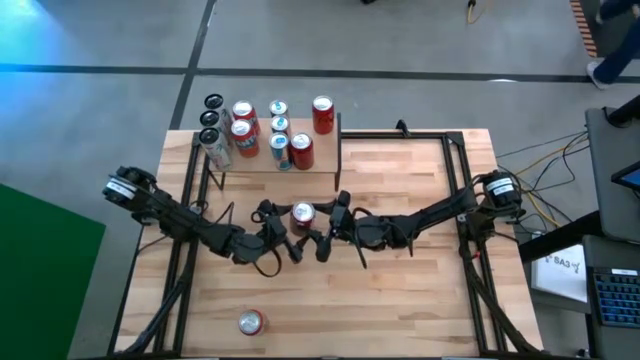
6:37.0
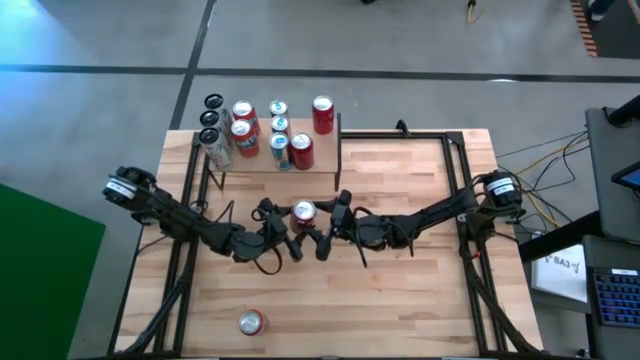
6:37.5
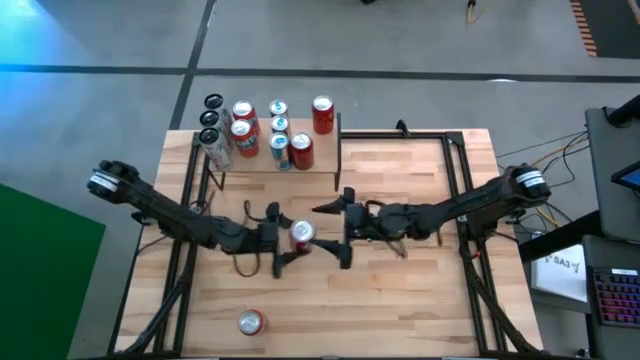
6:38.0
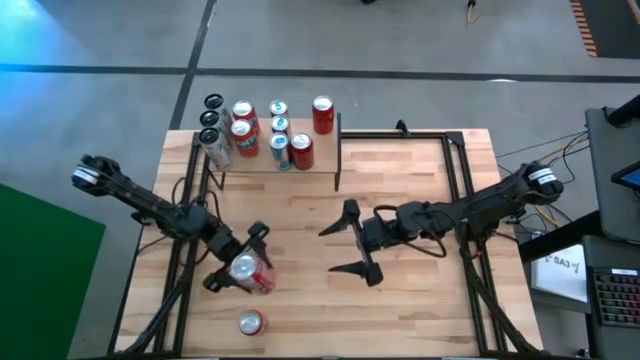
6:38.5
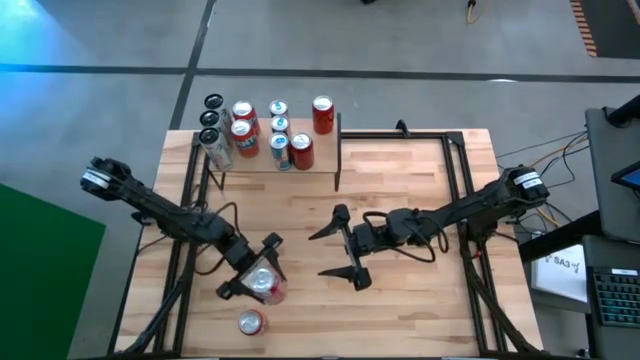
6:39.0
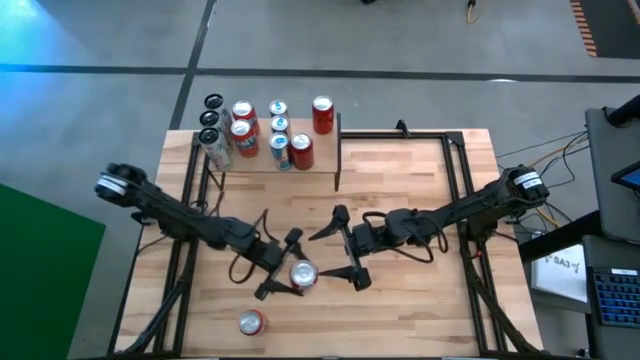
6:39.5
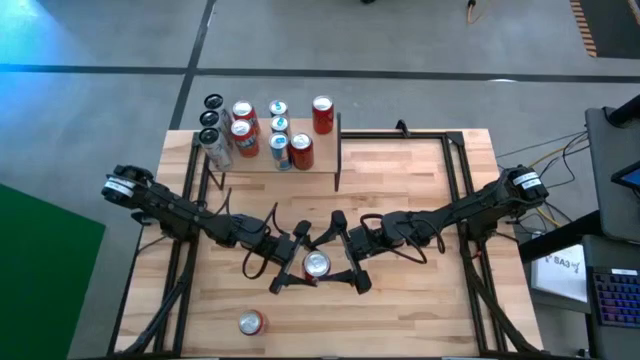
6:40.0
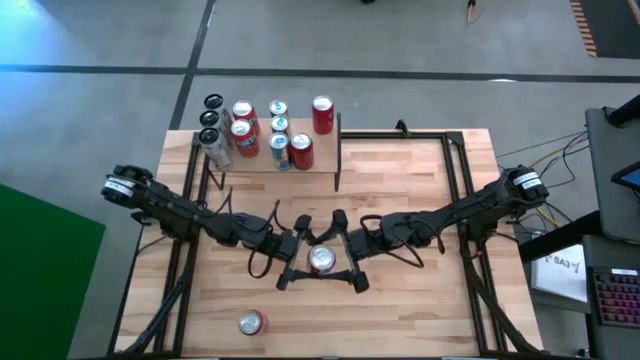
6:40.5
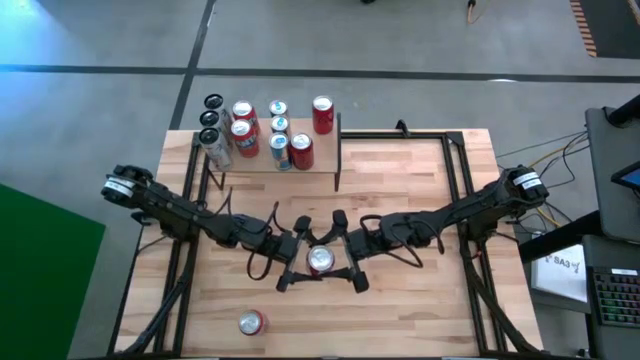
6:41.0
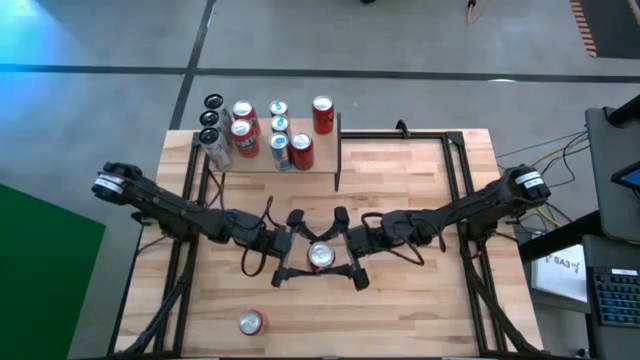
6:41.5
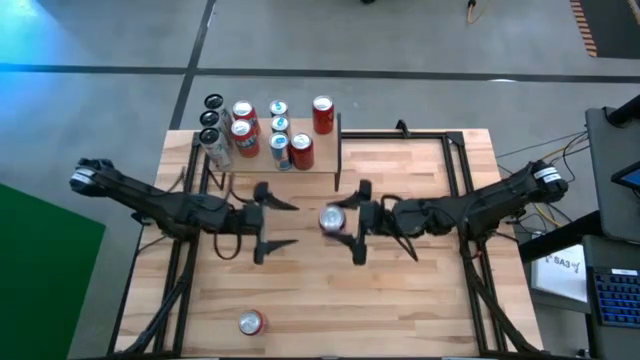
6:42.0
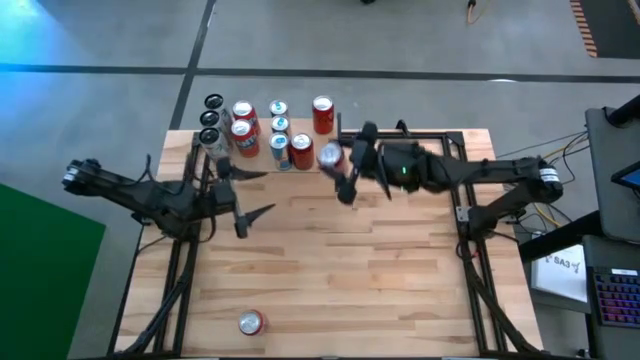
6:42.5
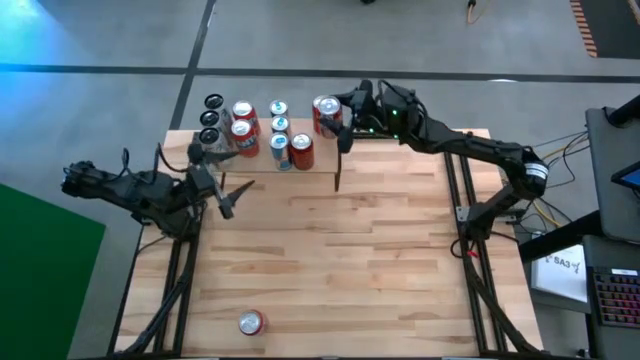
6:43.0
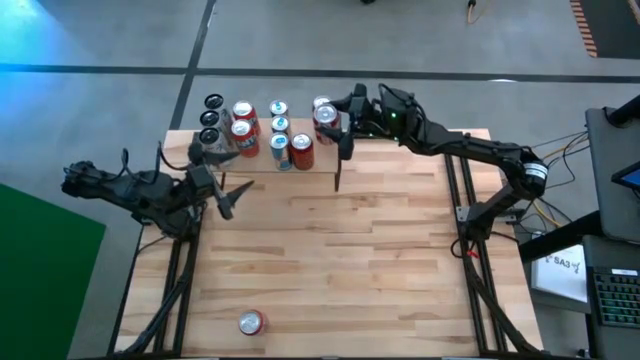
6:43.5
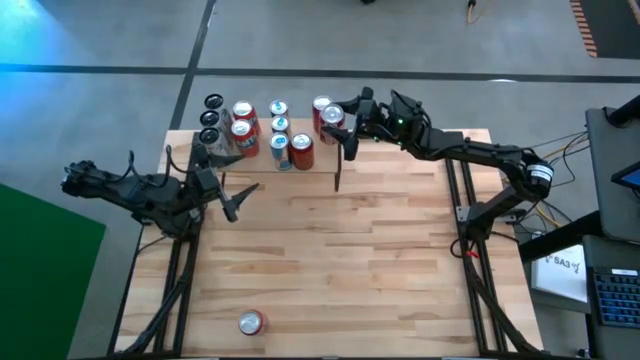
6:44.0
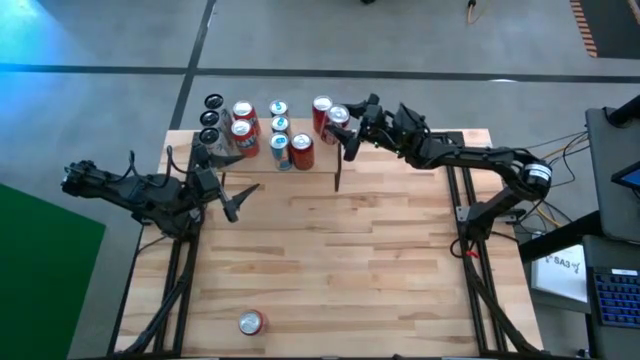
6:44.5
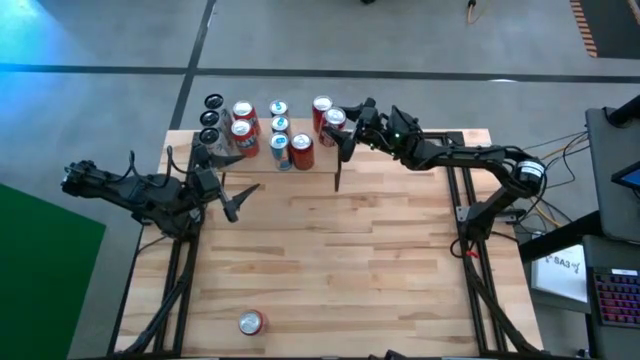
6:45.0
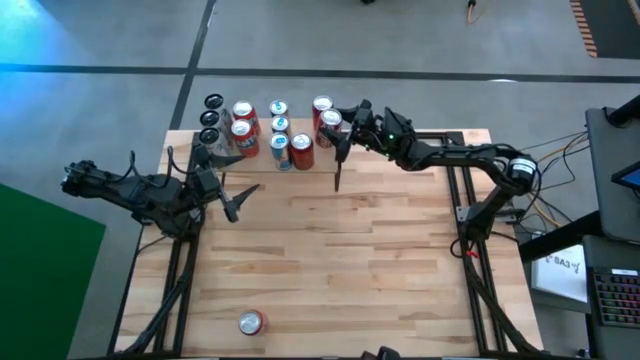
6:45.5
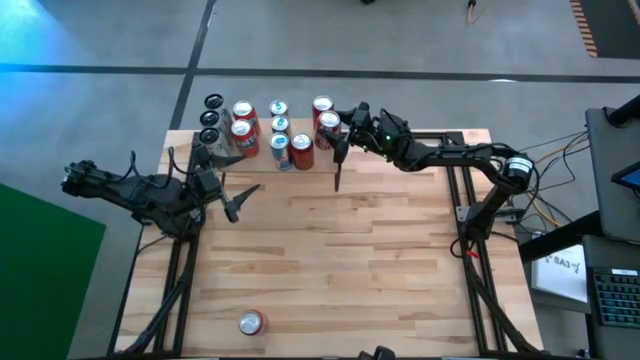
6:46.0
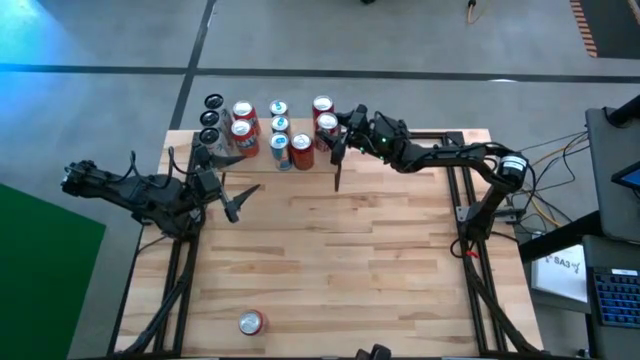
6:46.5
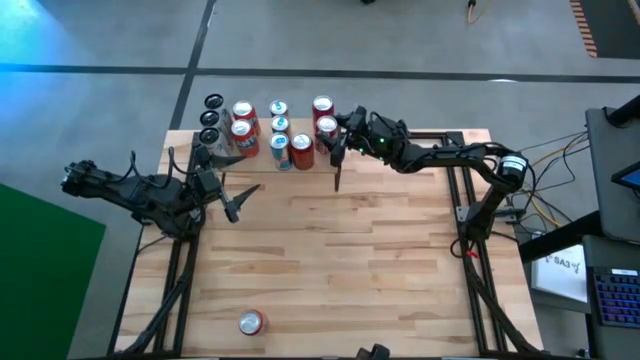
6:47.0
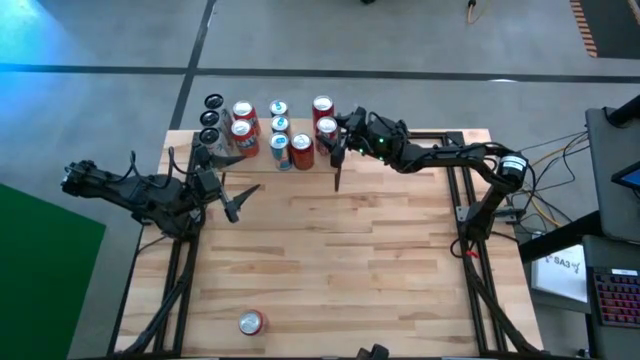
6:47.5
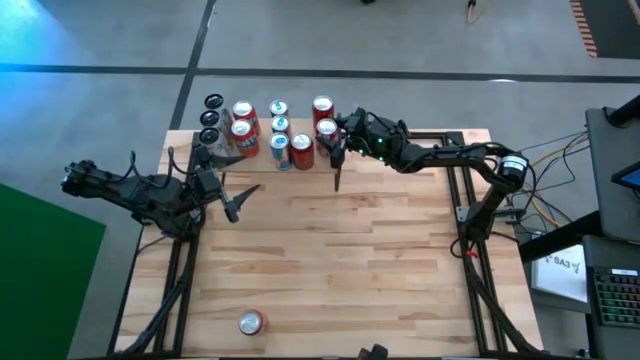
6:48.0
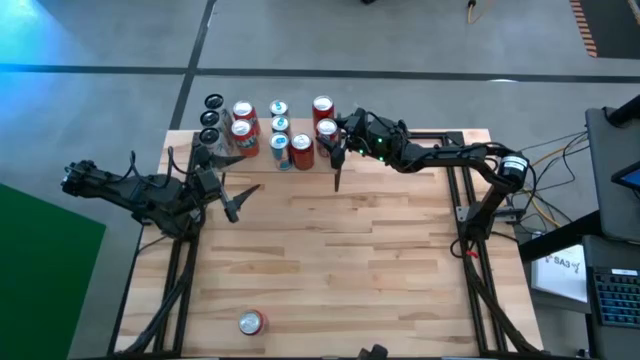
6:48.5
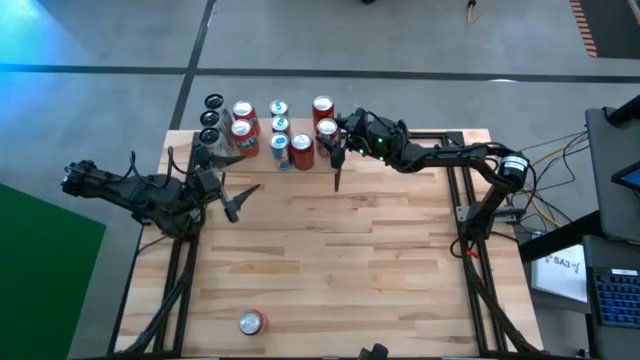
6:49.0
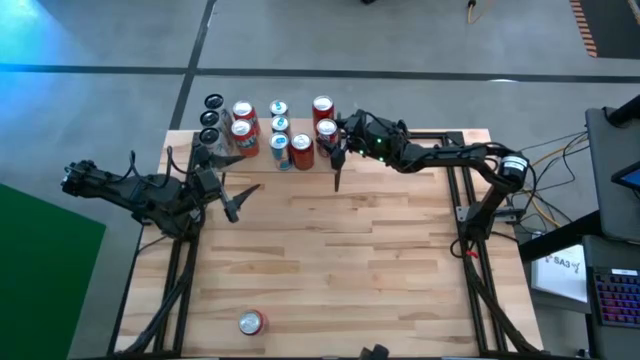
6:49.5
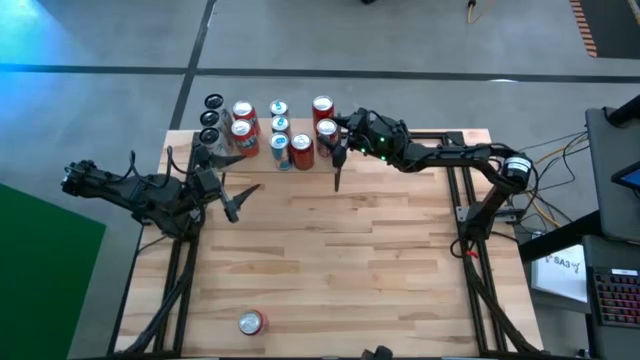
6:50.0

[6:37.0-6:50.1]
Task: Place canned beverage on shelf
Put the red white soda can on the shelf

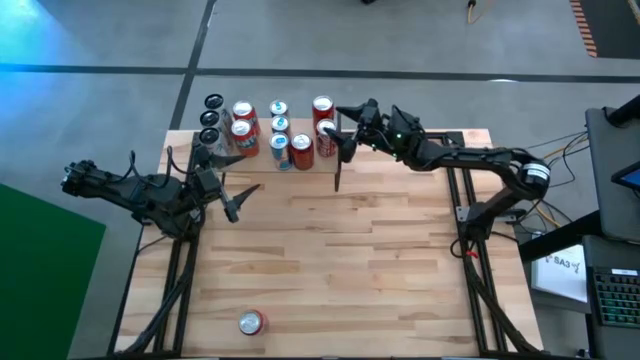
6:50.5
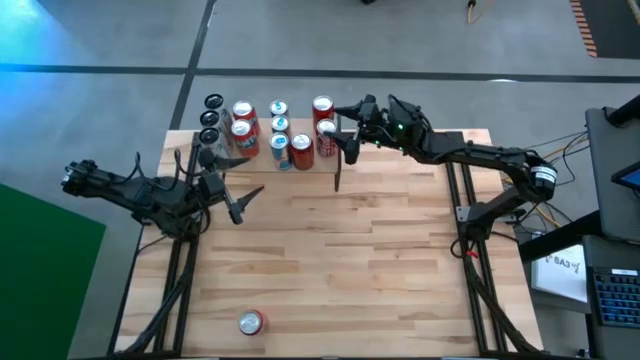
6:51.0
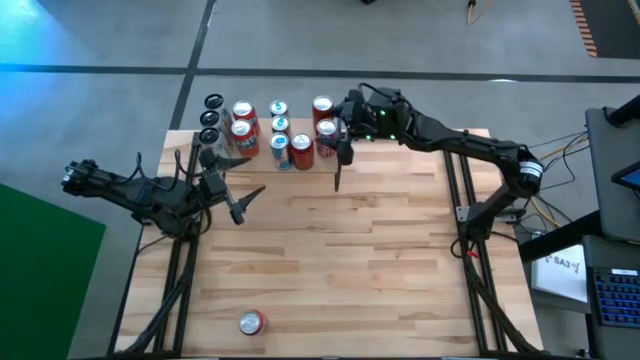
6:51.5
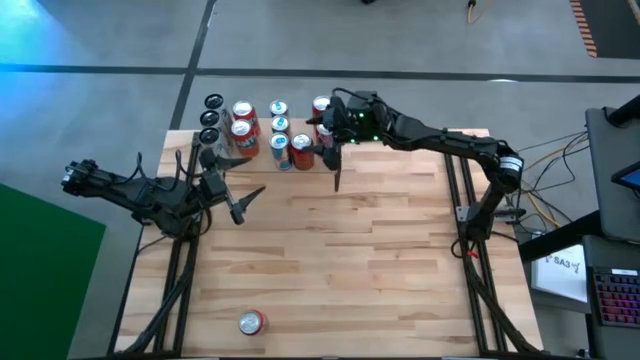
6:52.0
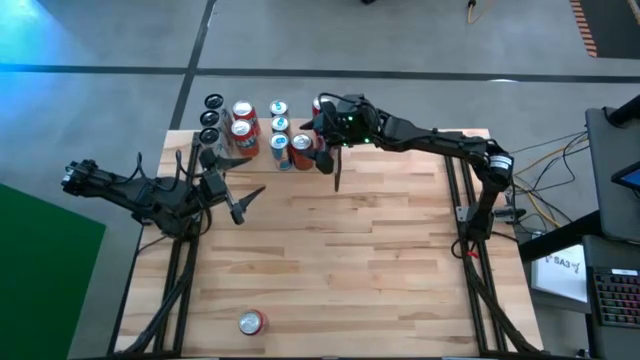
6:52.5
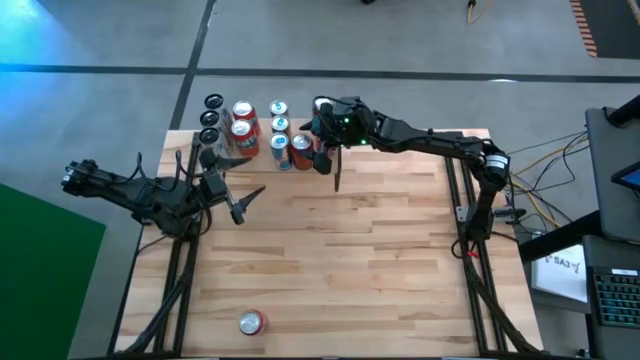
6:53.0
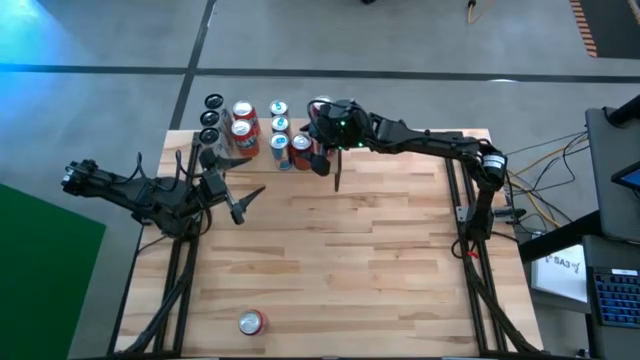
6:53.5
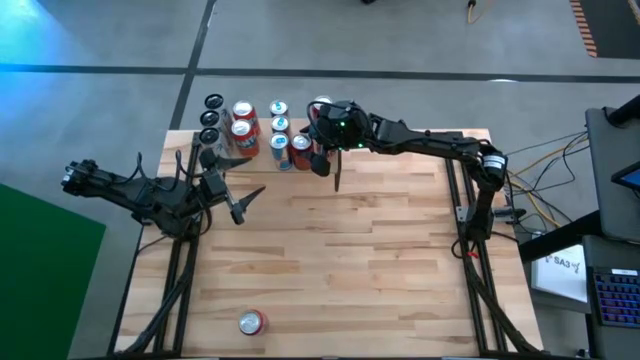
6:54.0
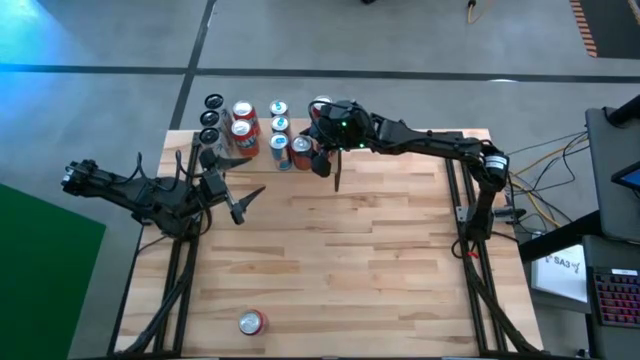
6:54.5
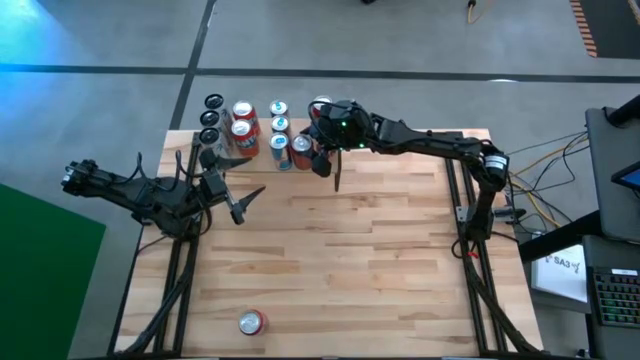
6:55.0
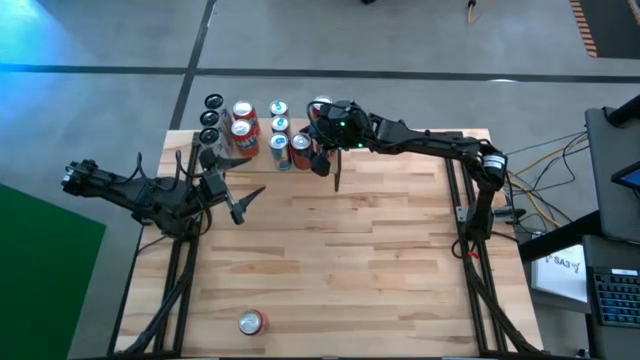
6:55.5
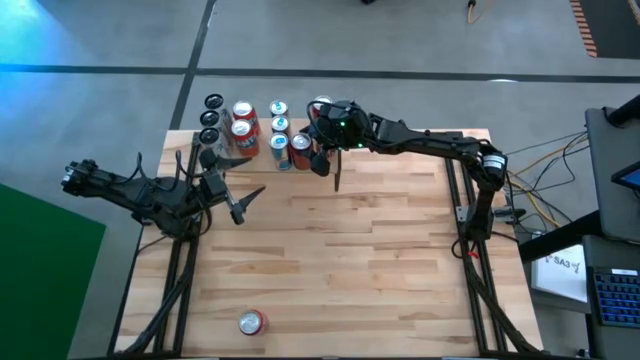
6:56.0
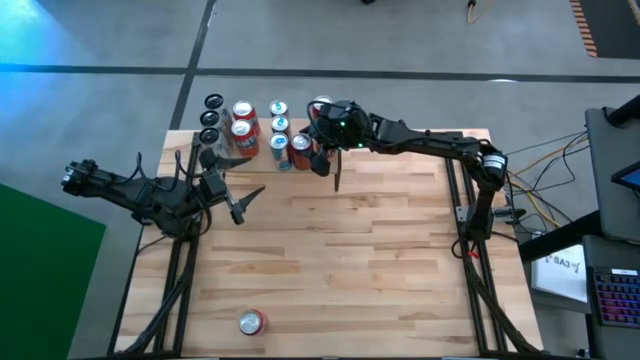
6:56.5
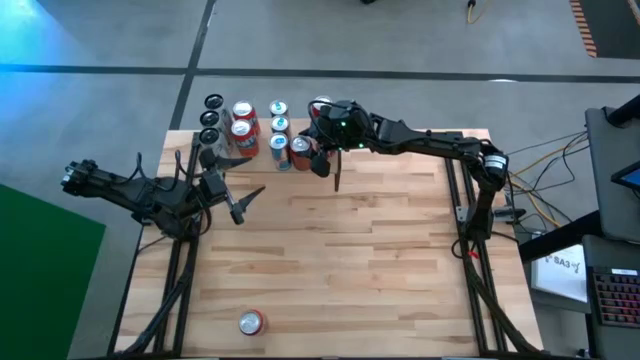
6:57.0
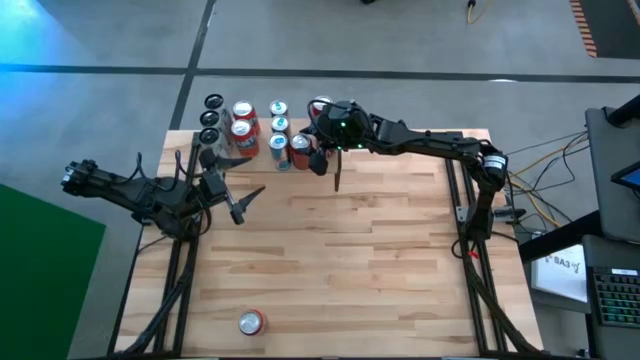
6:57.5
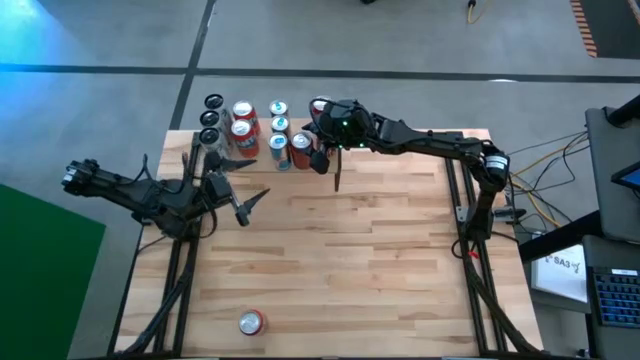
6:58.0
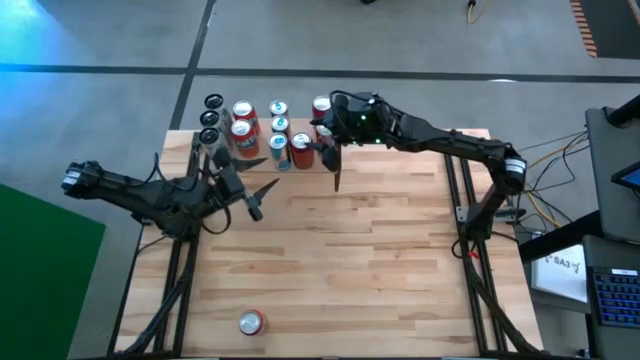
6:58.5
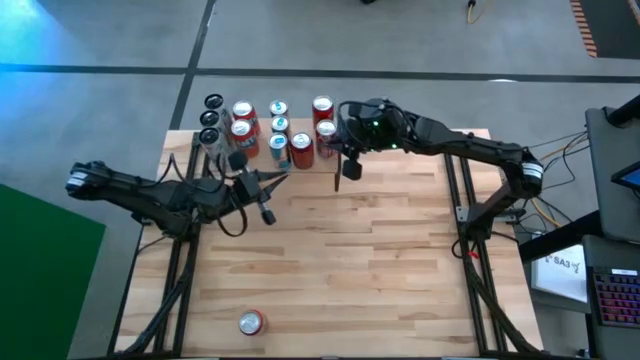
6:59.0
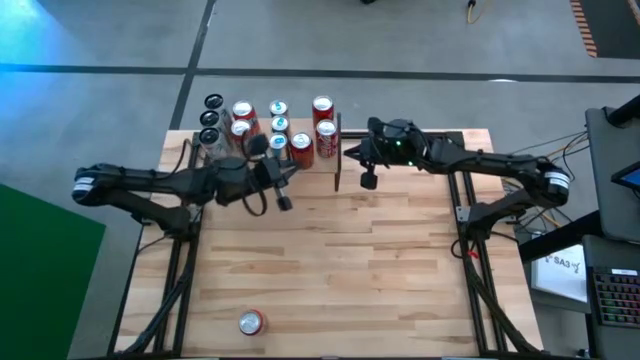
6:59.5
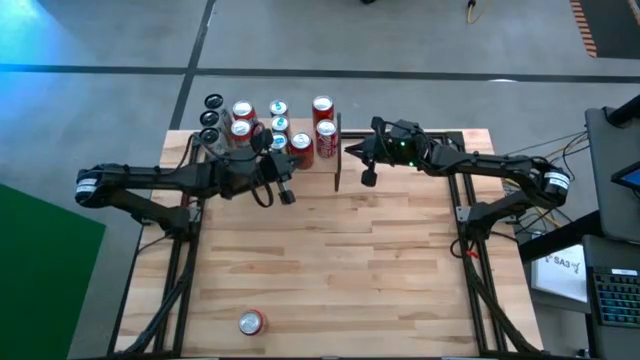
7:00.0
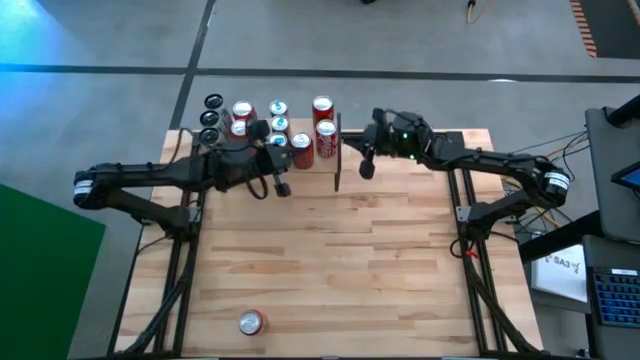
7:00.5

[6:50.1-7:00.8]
Adjust the red black soda cans on the shelf
